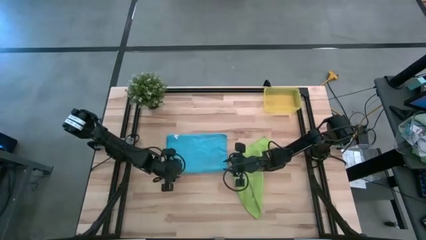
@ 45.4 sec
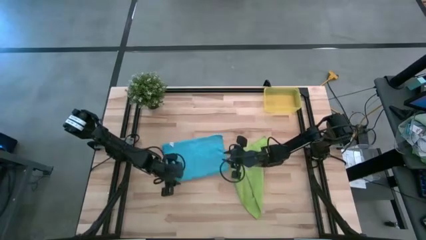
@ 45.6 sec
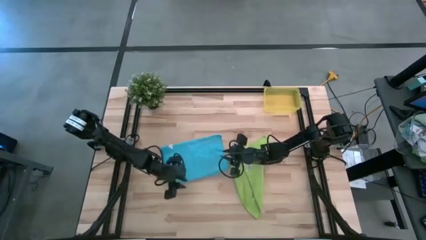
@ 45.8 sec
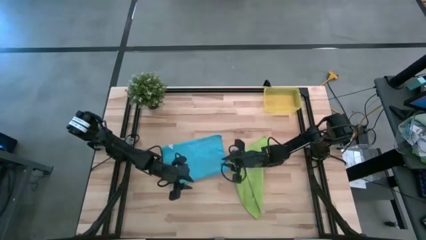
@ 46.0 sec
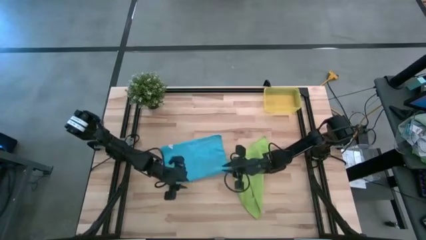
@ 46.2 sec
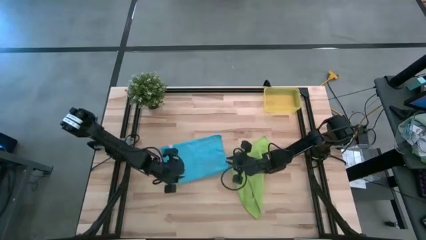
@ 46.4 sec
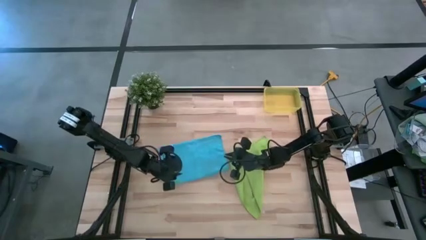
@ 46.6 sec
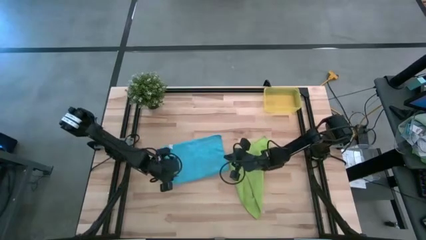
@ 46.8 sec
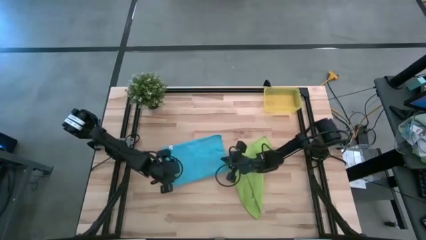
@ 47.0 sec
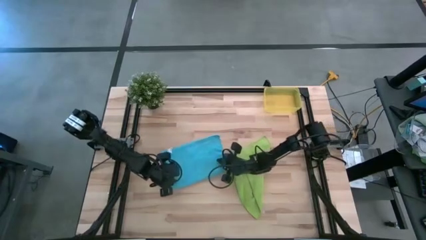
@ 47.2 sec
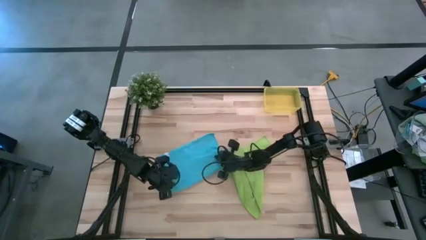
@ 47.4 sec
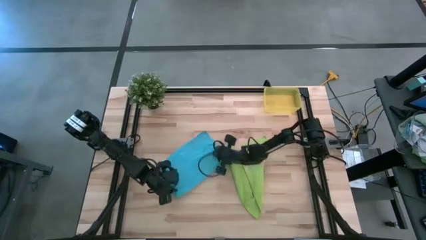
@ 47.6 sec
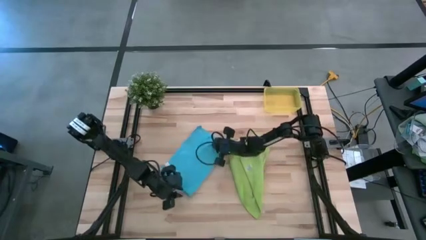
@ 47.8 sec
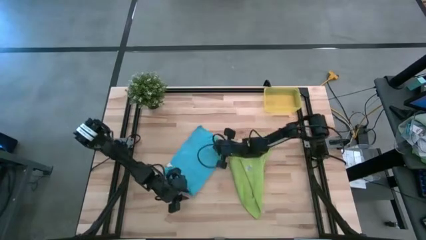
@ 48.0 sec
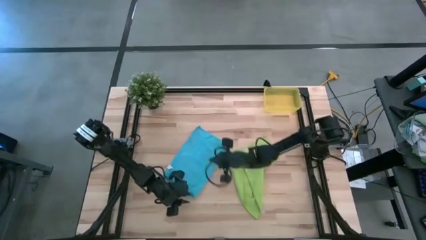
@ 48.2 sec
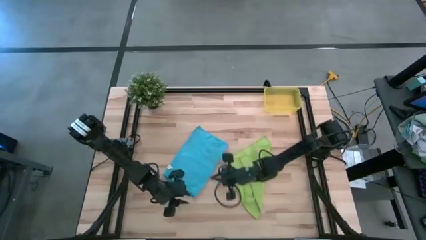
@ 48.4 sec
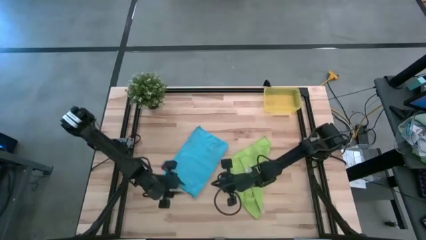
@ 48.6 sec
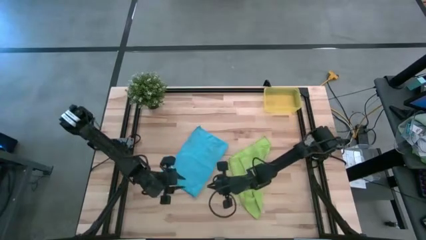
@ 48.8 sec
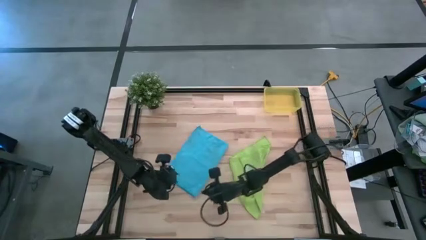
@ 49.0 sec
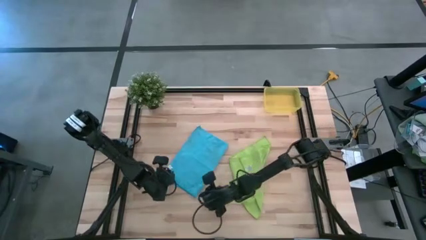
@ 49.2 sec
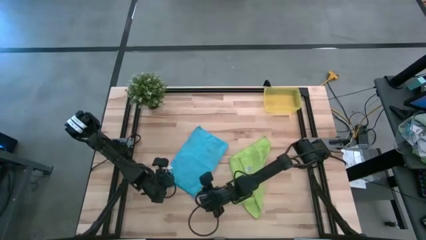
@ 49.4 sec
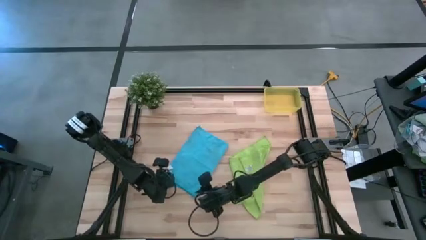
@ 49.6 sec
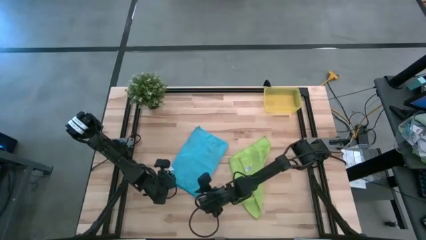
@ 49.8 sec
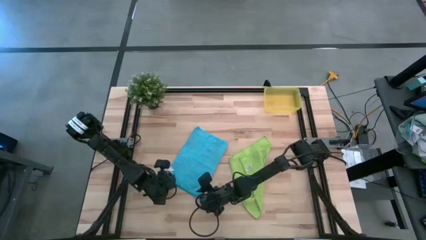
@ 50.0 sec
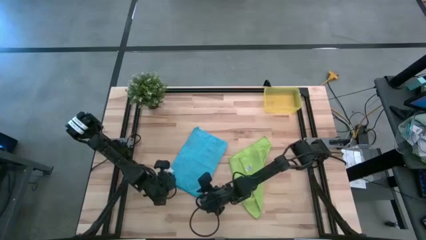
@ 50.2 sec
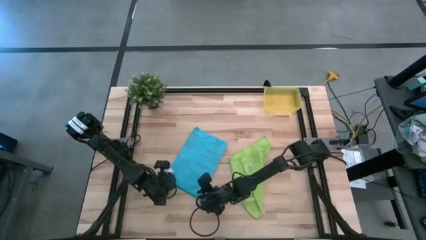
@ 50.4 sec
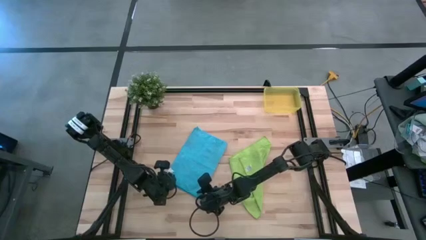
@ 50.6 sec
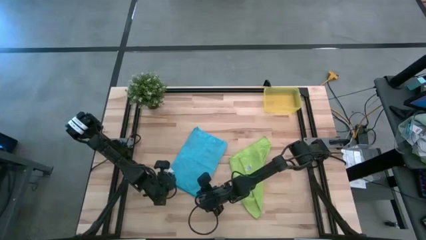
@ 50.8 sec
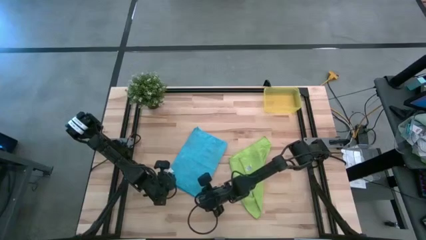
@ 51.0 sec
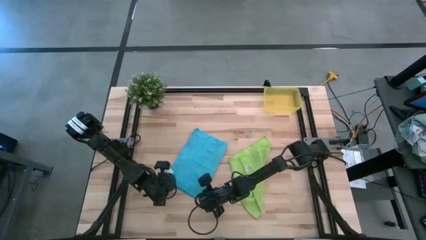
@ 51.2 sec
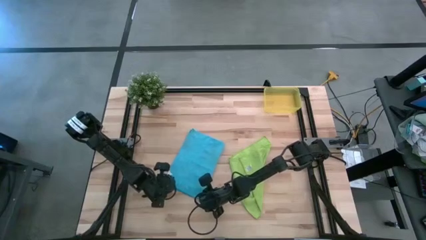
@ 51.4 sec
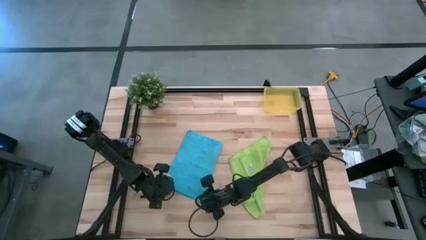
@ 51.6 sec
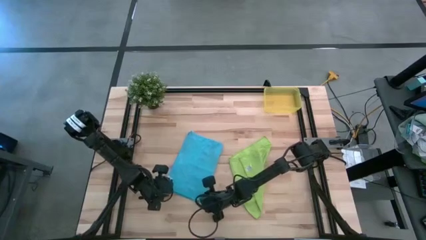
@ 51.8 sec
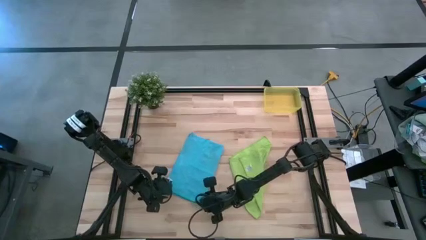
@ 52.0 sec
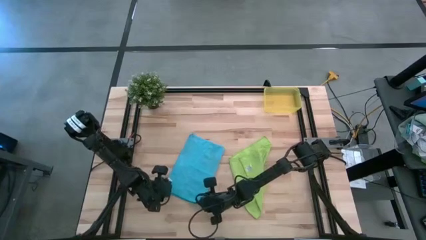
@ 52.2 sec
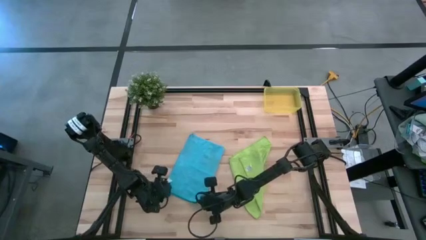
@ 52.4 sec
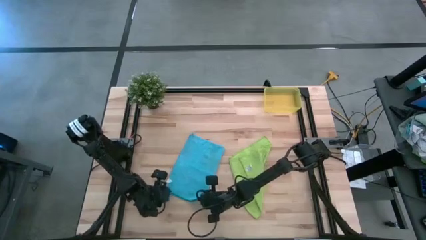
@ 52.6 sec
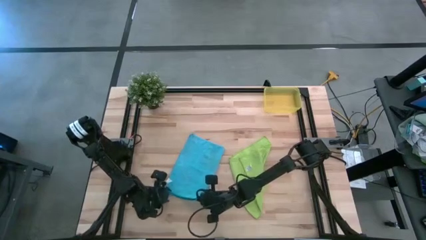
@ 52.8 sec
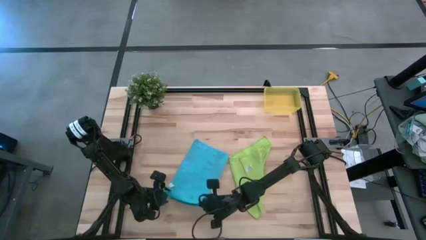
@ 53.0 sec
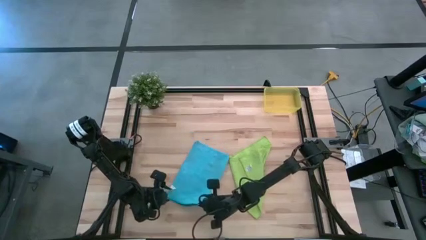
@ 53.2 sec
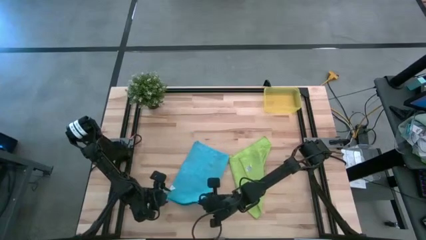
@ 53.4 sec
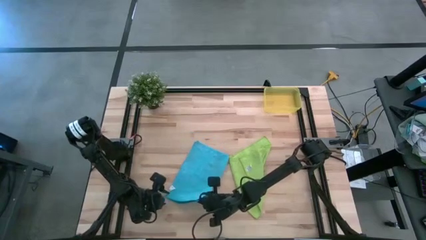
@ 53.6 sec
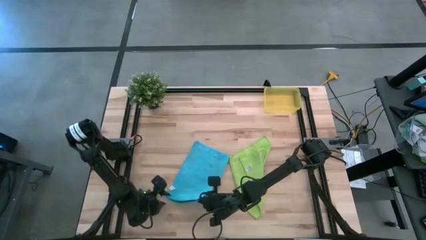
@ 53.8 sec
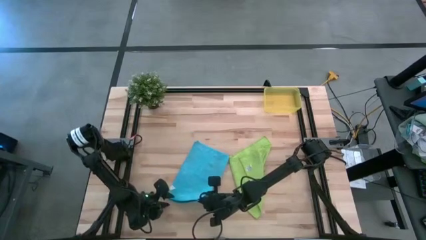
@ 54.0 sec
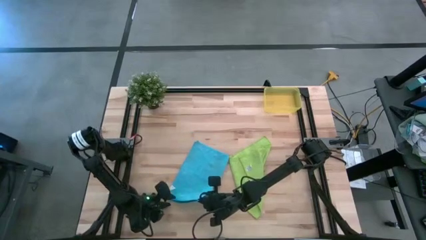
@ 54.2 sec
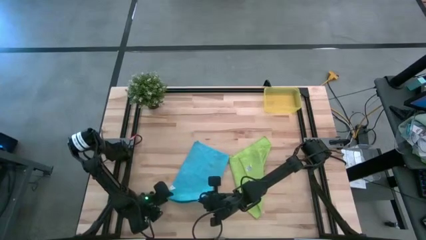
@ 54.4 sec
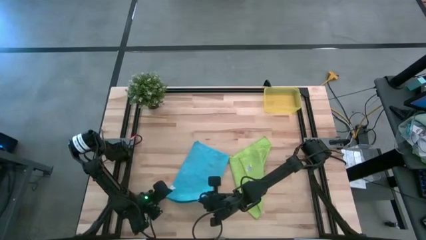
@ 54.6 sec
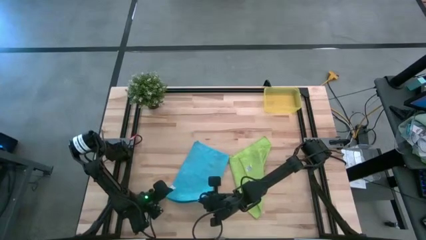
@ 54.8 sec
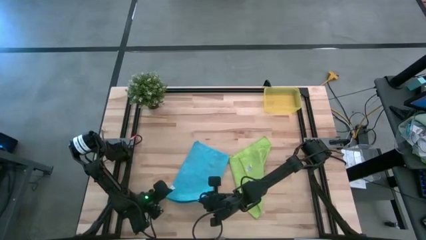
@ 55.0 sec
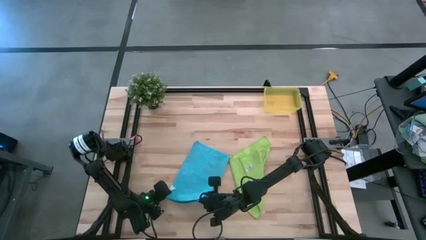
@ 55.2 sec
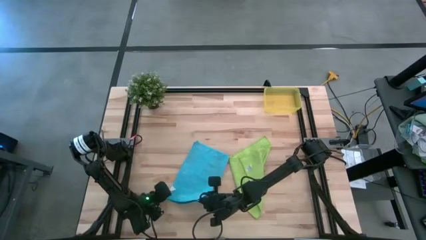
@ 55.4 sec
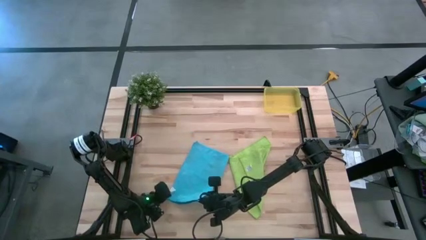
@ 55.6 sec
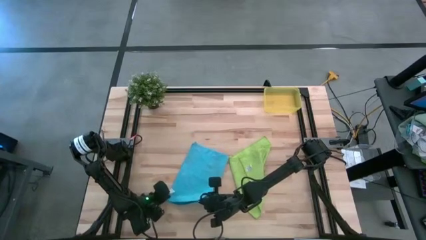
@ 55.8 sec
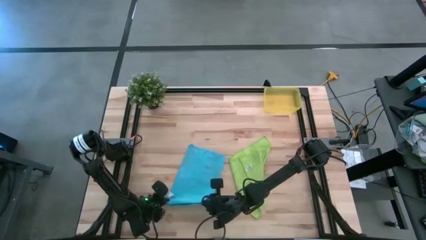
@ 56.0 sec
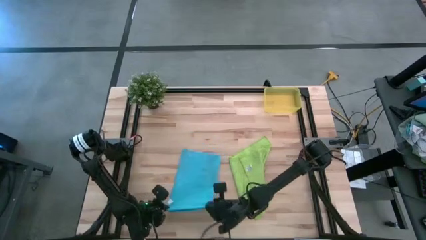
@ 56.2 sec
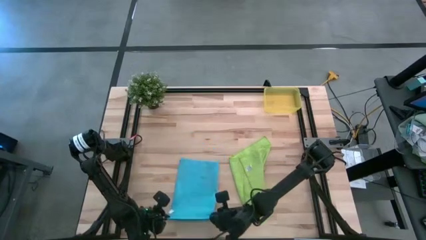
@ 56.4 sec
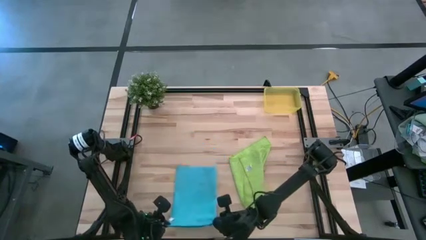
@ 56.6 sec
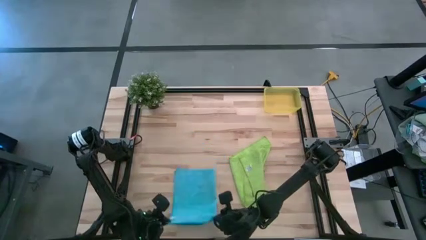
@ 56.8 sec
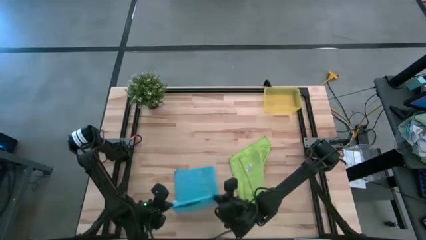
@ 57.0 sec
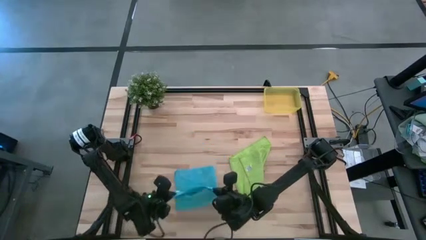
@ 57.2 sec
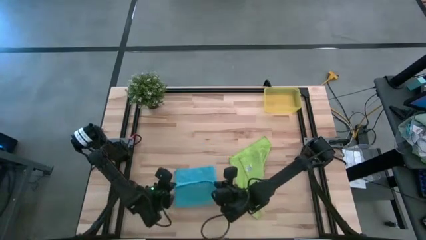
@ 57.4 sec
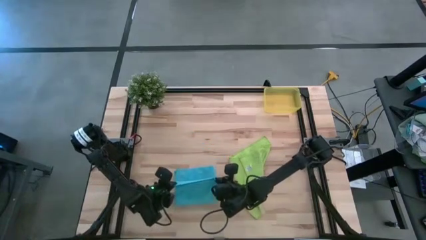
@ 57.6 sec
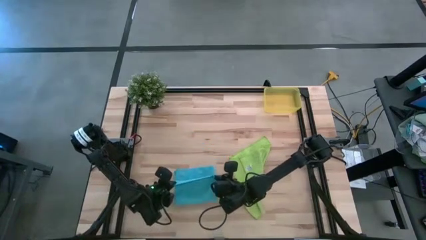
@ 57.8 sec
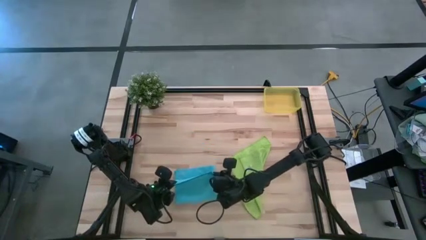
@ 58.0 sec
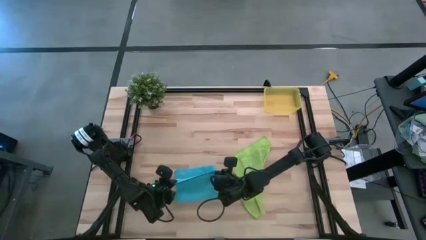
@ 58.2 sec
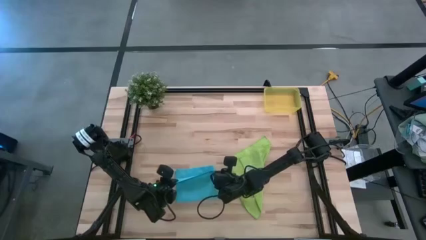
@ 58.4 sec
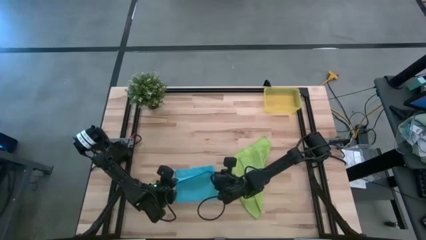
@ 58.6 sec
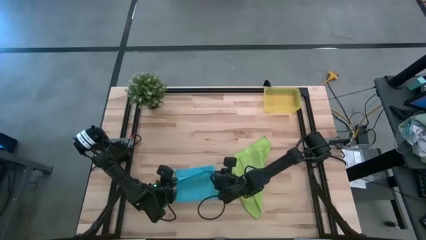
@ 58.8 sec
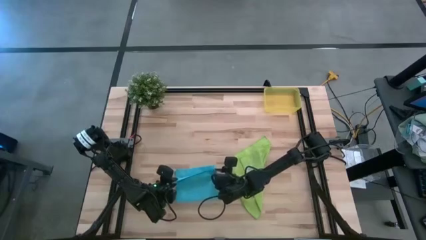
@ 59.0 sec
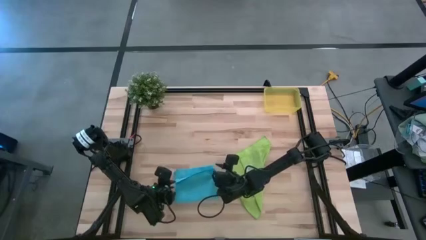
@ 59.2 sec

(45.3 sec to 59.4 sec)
Task: Roll microfiber towels into tight, uniform cylinder then place into a basket
Fold the blue microfiber towel
